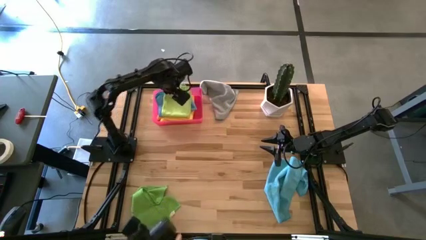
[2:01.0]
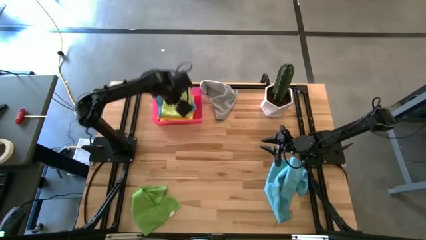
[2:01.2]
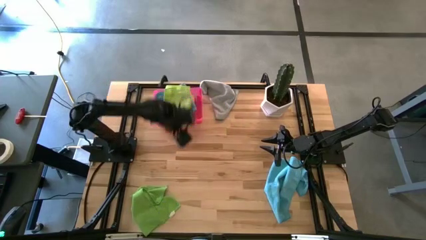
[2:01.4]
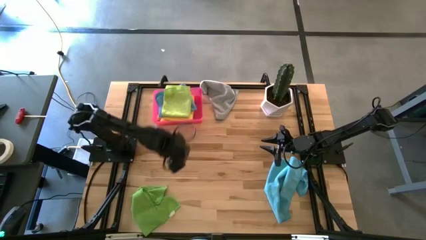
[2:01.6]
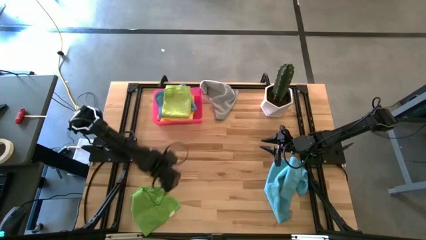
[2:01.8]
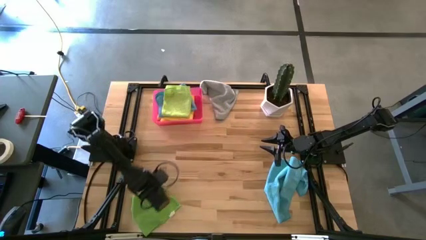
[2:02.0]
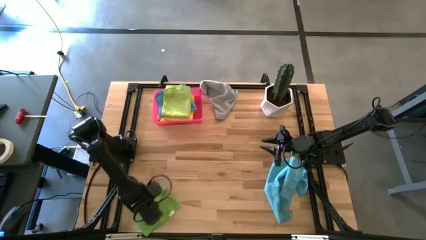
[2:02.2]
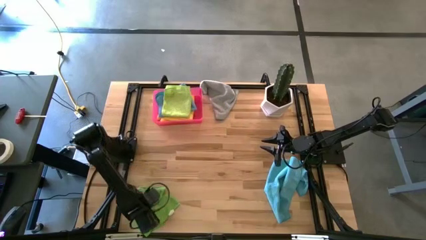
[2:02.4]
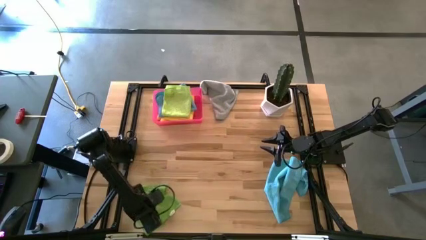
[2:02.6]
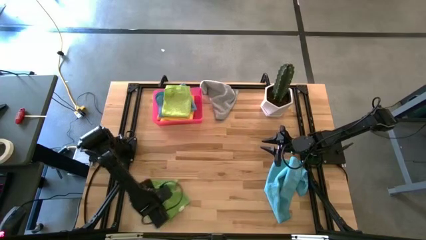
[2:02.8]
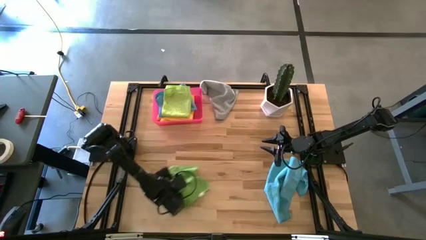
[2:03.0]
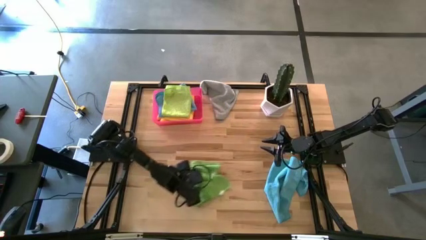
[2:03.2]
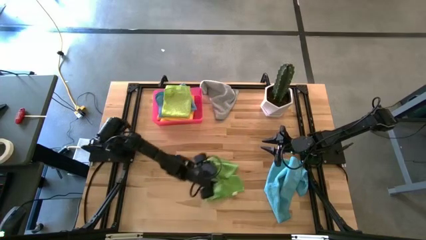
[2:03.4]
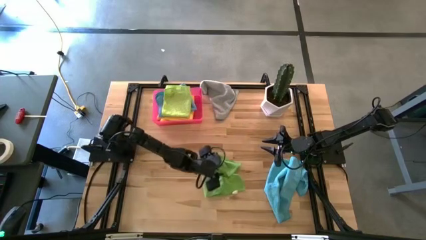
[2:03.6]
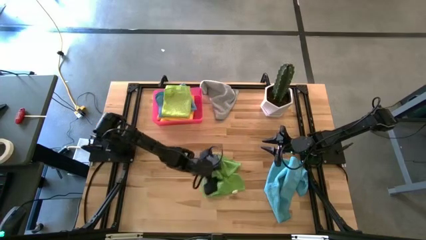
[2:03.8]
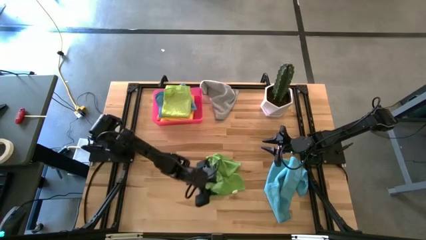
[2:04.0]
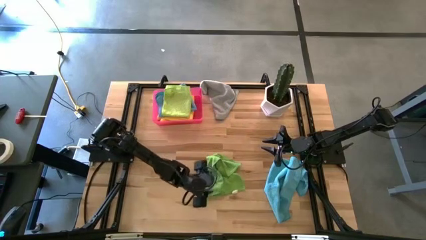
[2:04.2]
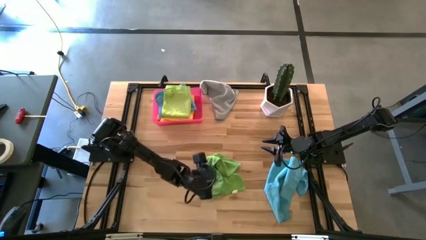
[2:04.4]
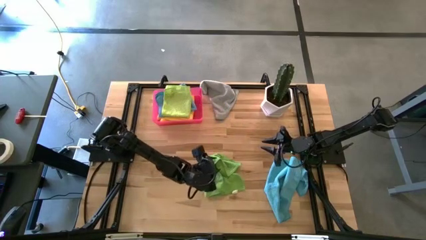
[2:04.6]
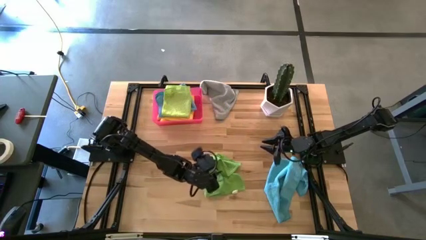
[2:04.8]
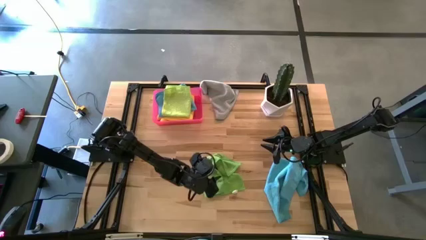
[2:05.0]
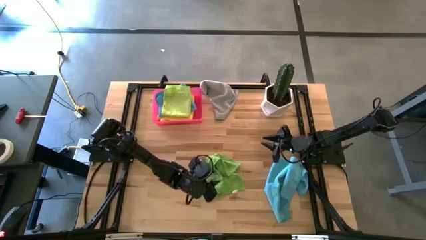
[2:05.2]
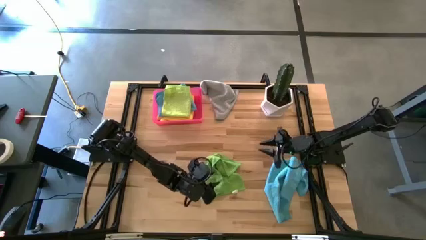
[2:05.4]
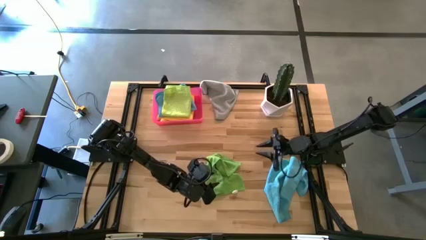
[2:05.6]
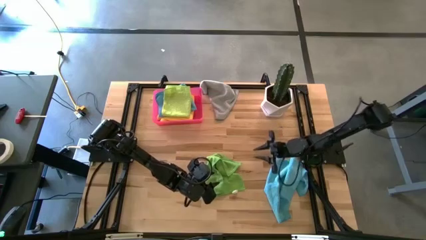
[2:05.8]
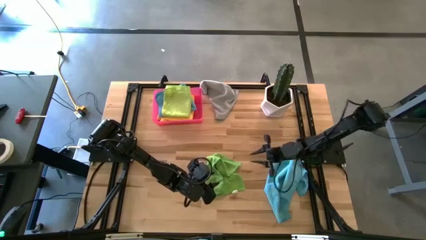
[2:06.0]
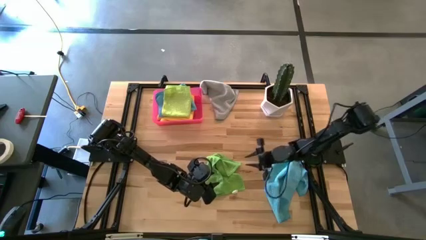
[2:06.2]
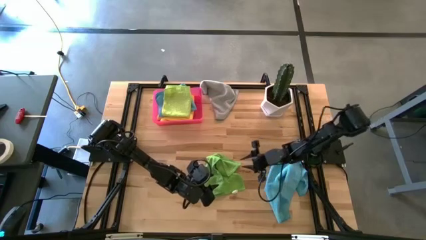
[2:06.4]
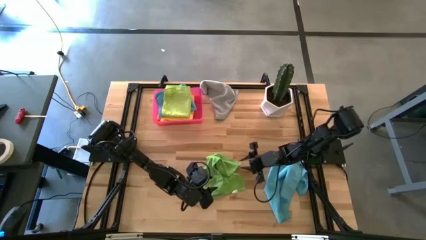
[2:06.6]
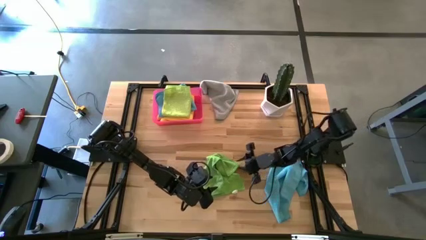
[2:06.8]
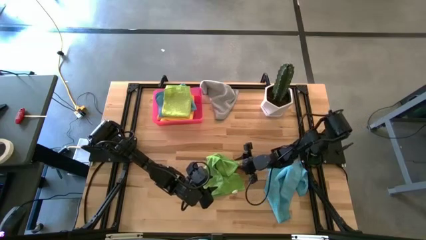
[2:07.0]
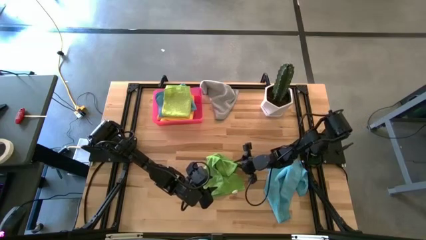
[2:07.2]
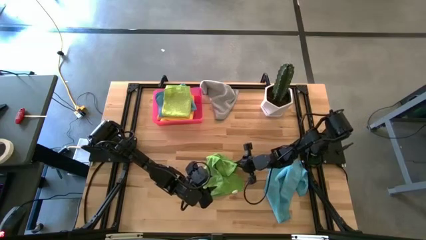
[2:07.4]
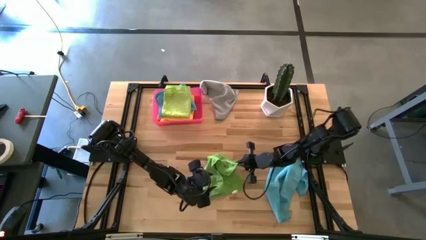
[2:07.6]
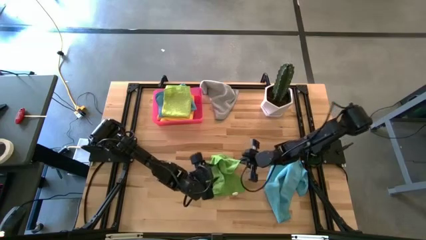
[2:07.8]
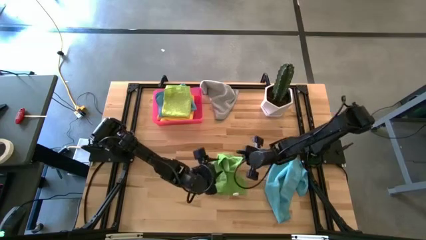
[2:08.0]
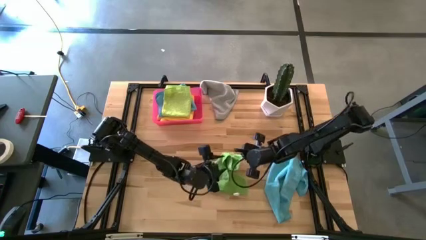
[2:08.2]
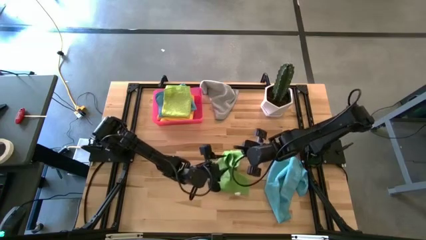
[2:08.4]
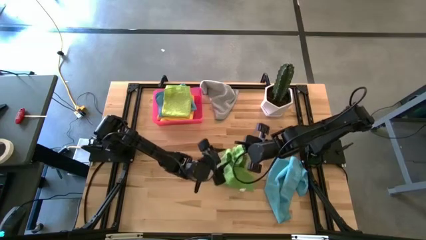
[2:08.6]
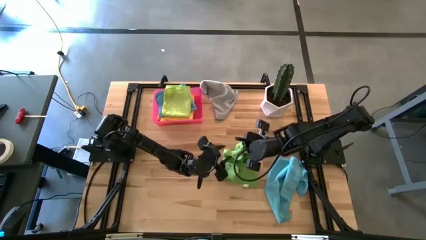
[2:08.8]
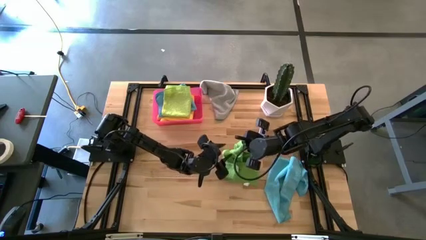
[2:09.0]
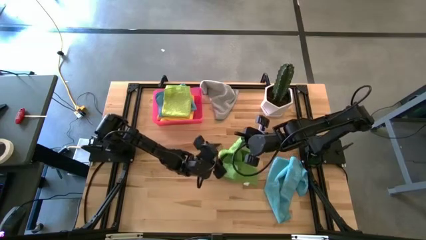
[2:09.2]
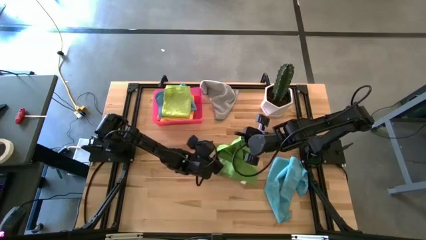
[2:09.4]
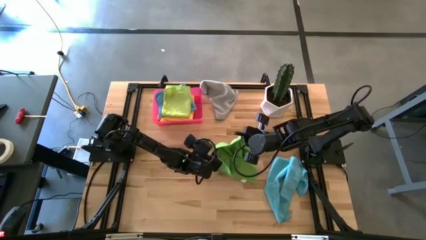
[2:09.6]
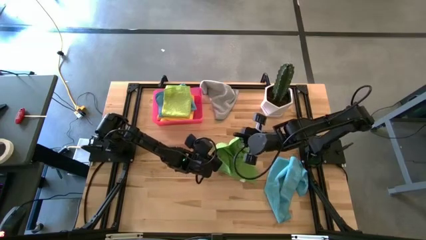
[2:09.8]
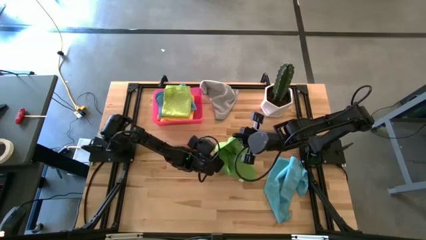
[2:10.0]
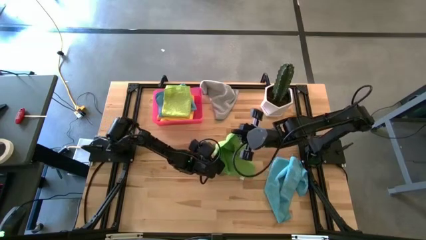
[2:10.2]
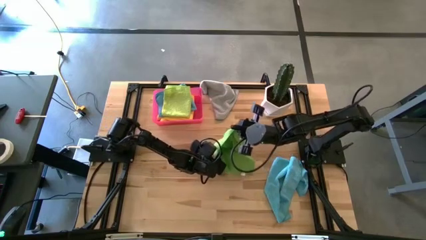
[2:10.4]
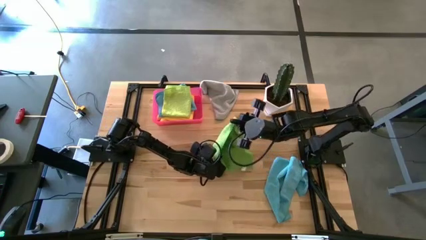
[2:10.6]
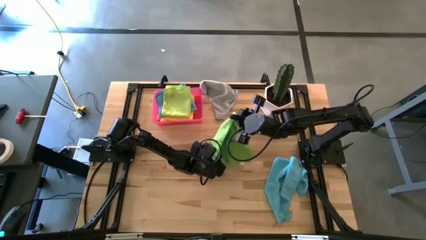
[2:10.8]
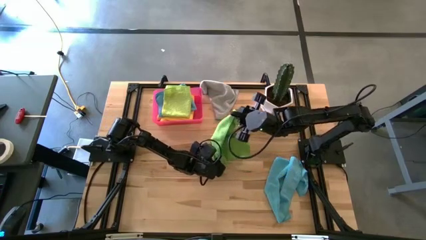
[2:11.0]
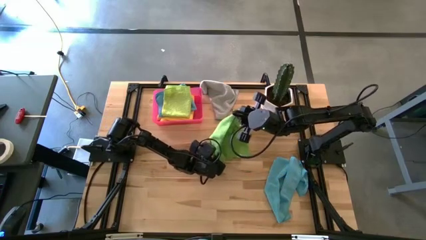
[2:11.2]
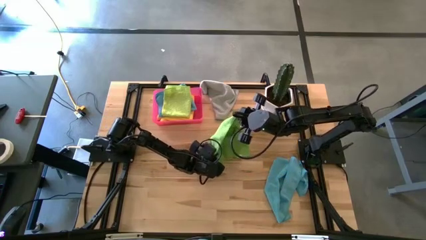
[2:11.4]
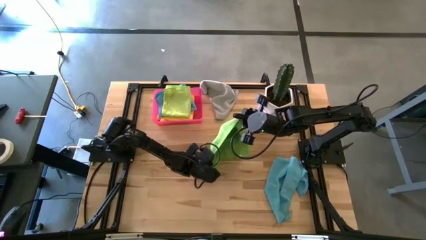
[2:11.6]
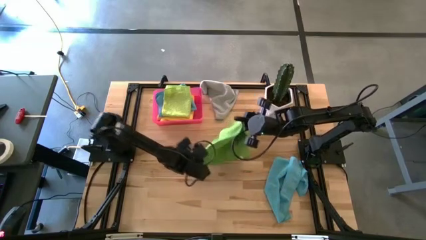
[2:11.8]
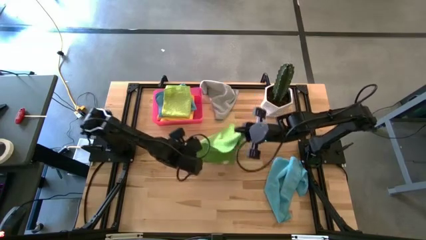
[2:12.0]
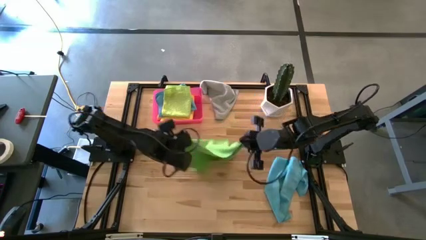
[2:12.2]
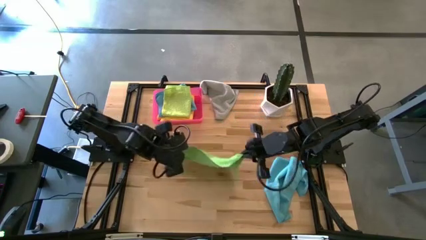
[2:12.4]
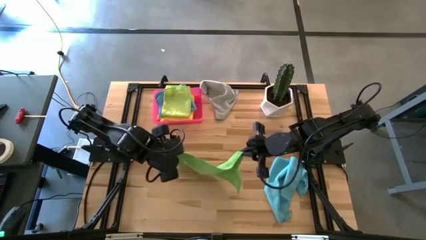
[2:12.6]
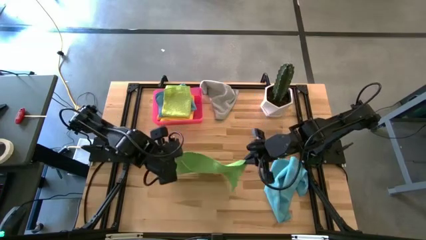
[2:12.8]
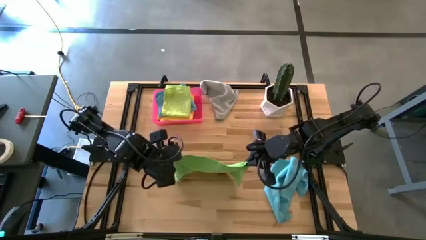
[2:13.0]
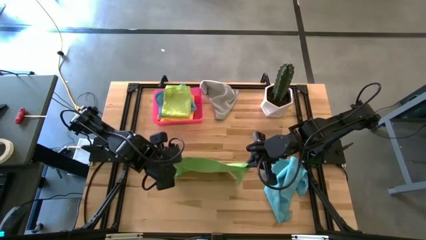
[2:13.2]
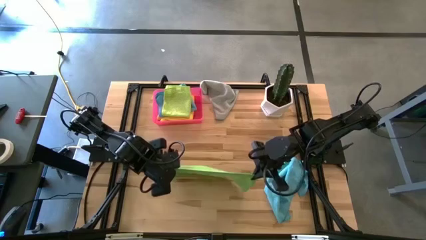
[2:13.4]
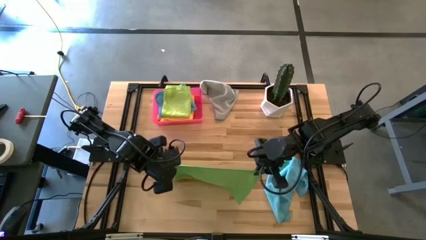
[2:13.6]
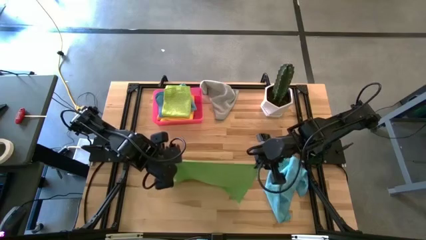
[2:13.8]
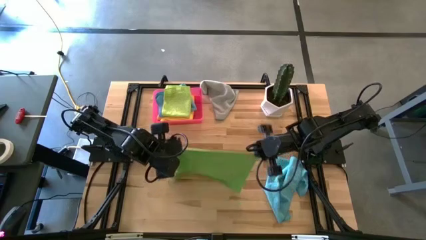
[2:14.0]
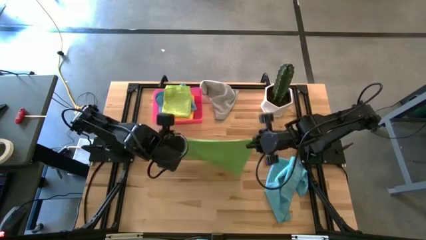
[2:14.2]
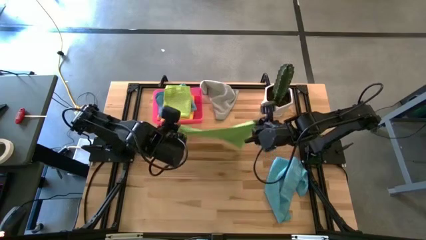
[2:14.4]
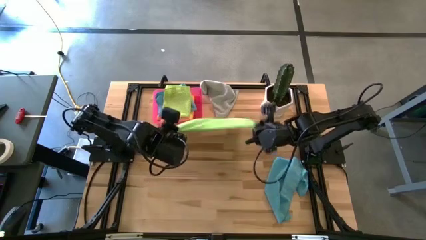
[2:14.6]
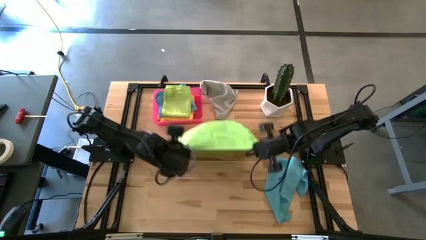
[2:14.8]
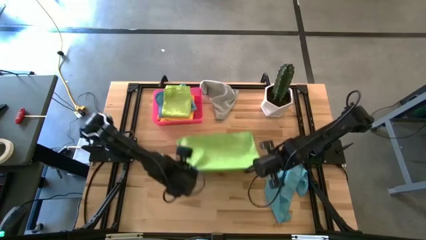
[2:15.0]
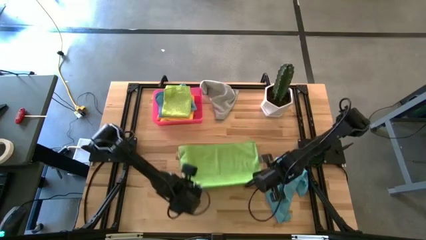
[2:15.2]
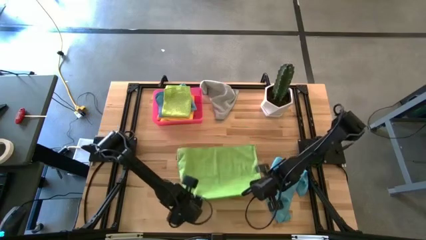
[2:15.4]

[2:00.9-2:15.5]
Task: Fold microfiber towels
Fold the green towel on the table

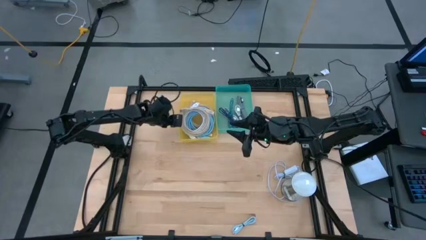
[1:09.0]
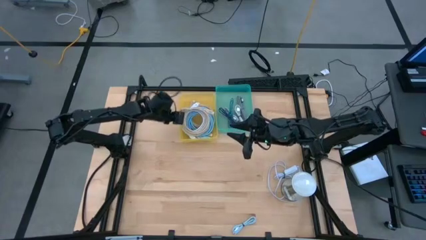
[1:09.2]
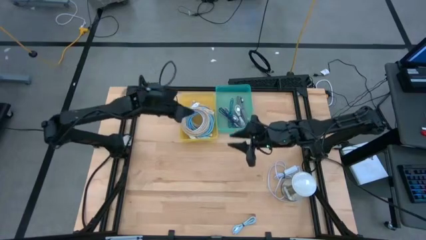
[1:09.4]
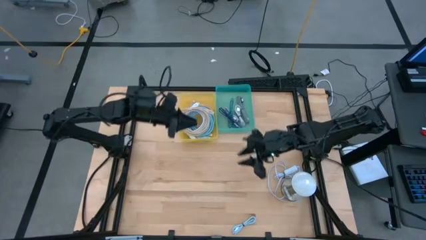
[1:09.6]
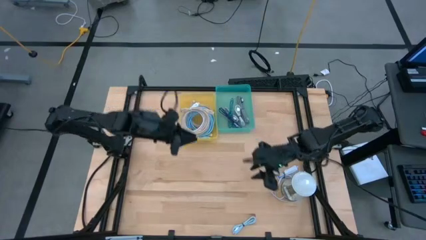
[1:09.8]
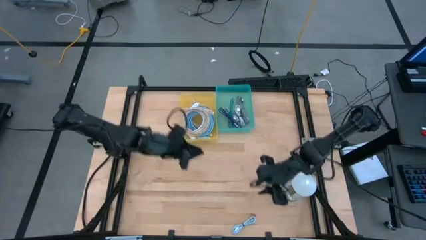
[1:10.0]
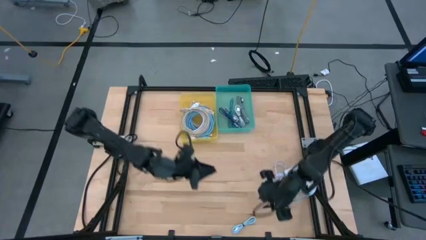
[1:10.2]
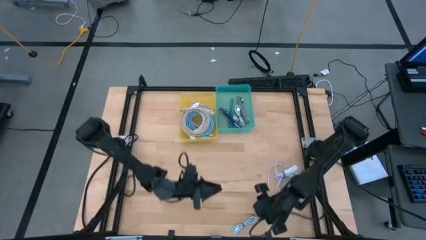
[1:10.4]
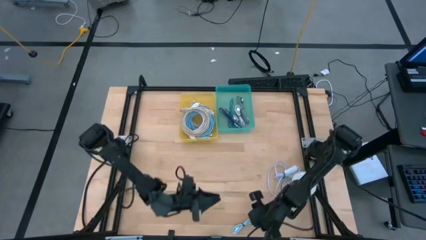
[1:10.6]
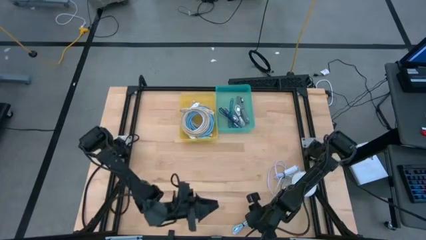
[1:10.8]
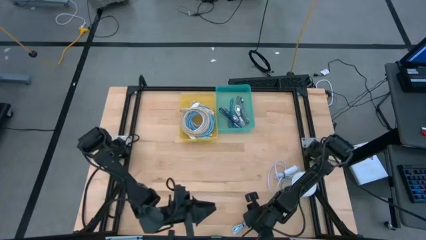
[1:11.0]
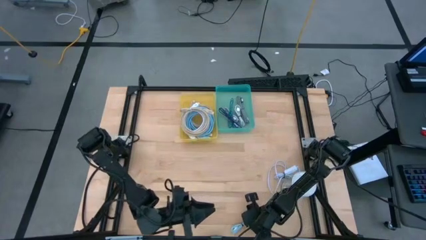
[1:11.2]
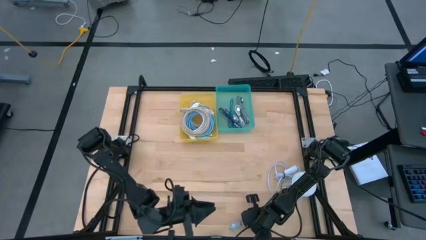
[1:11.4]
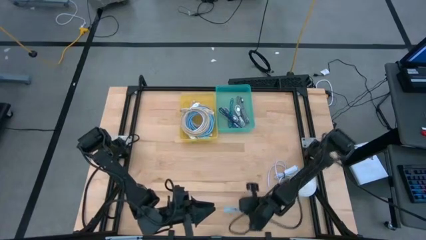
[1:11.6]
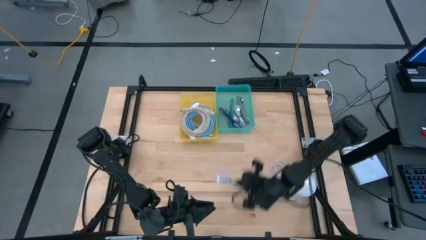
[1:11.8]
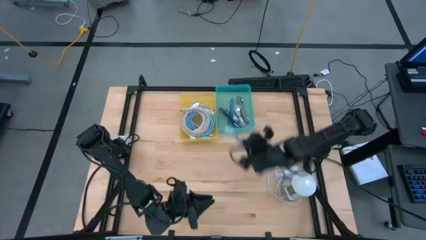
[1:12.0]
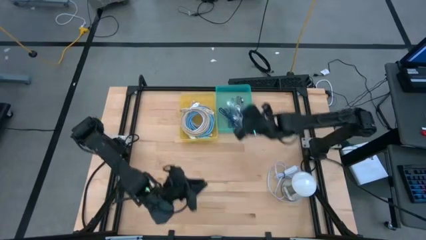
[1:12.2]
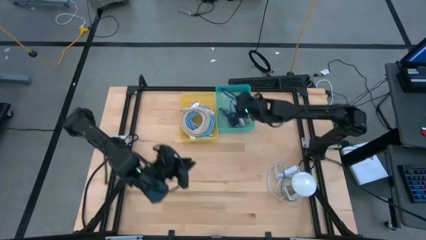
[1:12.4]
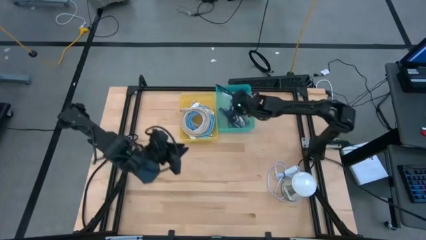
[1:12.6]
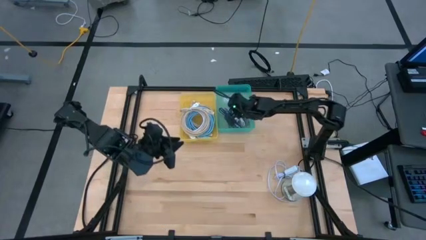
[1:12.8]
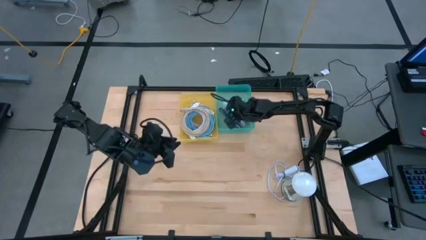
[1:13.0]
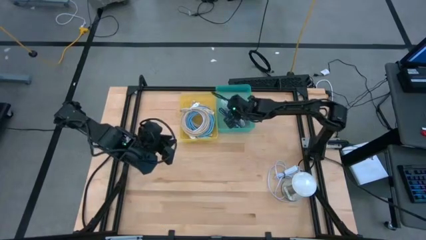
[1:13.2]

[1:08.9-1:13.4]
Task: Pick & Place USB Port
Put the light blue charger cable into the green bin
